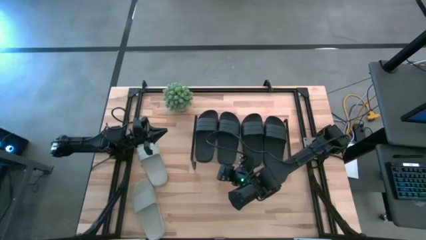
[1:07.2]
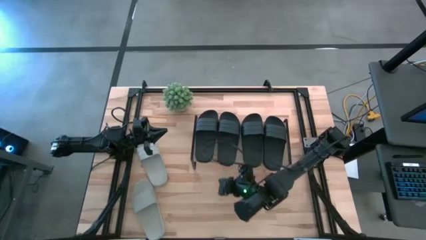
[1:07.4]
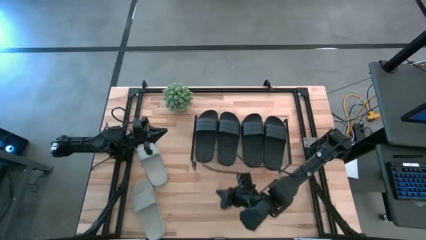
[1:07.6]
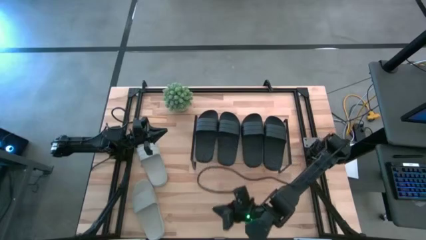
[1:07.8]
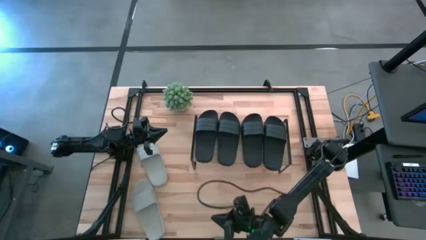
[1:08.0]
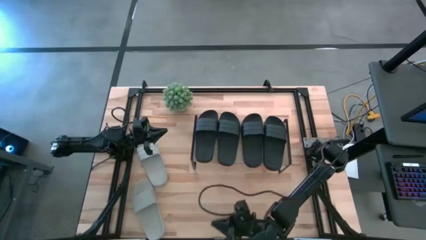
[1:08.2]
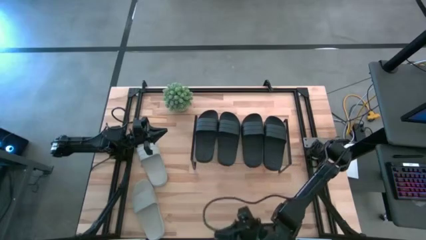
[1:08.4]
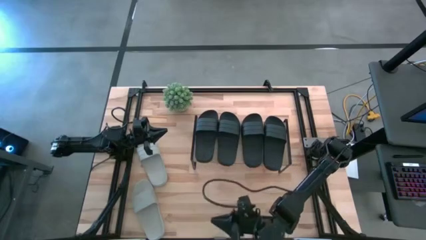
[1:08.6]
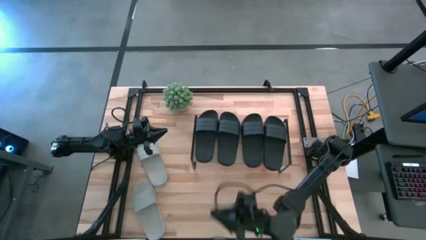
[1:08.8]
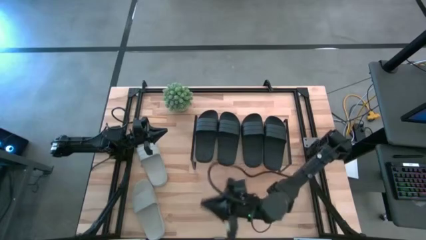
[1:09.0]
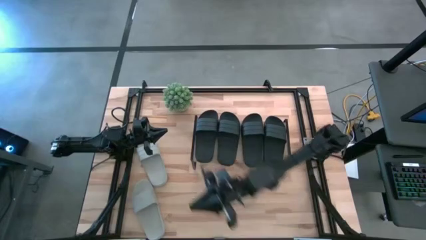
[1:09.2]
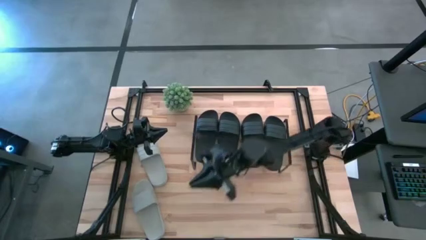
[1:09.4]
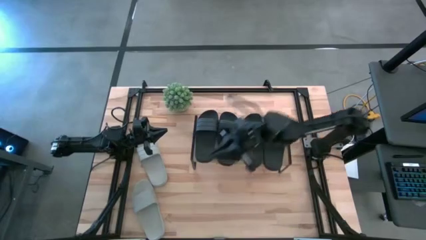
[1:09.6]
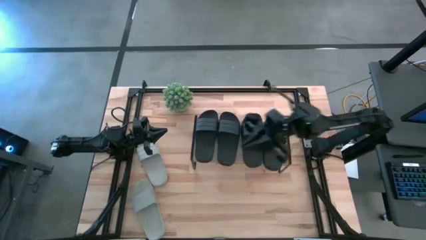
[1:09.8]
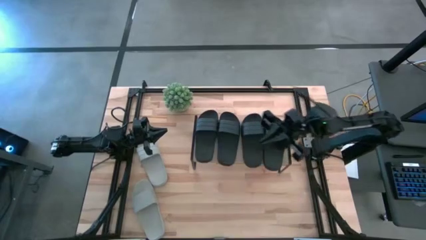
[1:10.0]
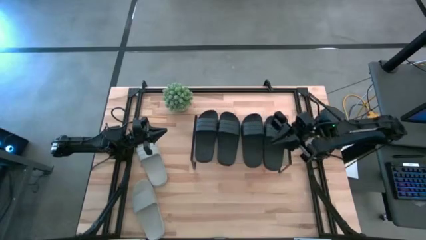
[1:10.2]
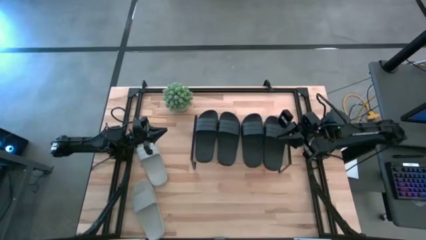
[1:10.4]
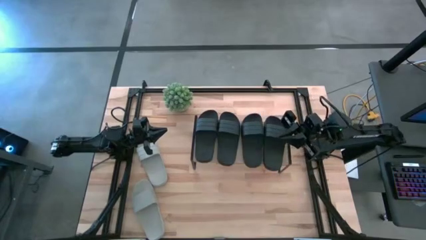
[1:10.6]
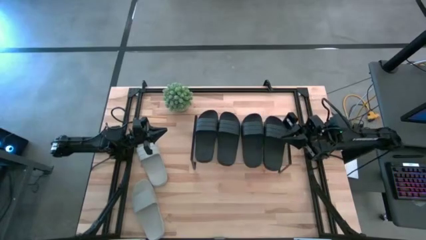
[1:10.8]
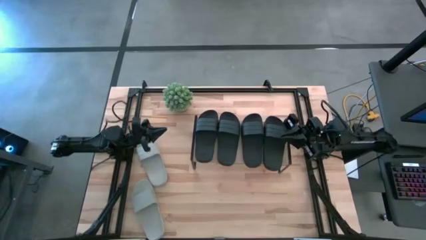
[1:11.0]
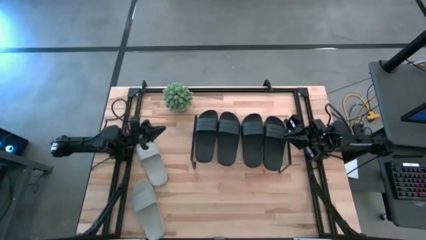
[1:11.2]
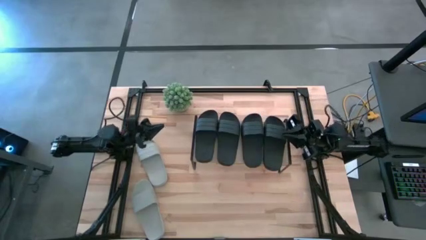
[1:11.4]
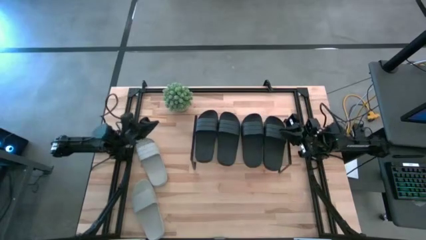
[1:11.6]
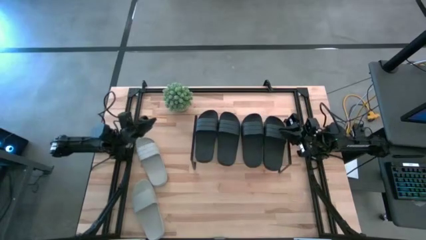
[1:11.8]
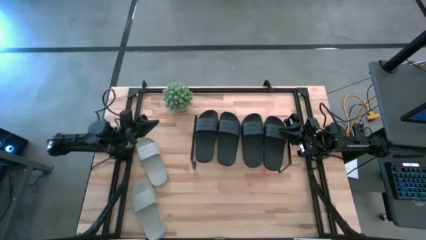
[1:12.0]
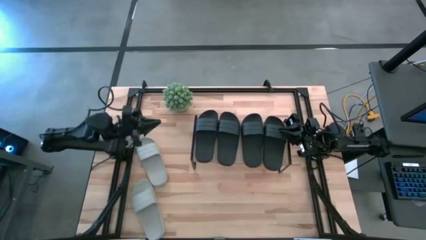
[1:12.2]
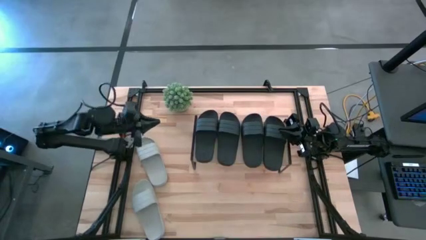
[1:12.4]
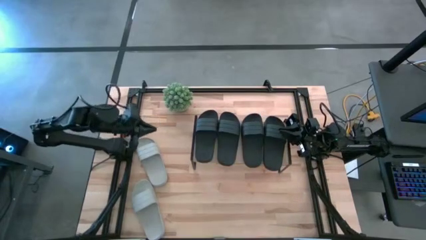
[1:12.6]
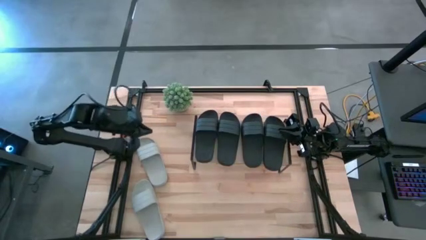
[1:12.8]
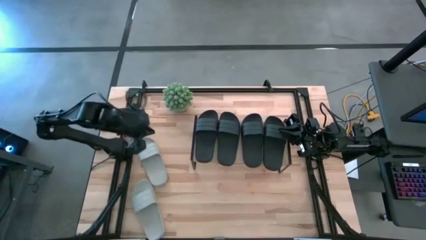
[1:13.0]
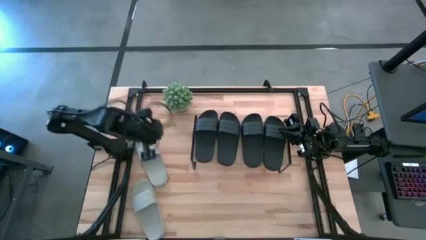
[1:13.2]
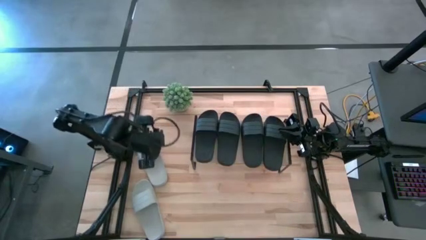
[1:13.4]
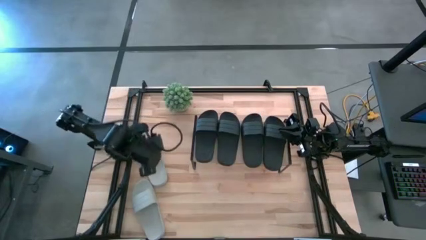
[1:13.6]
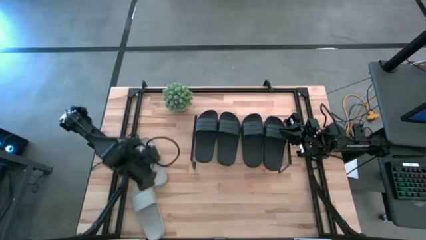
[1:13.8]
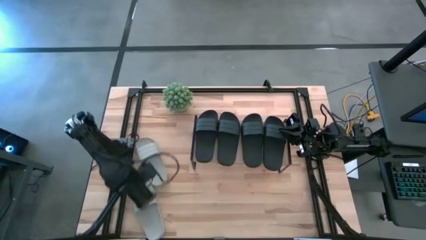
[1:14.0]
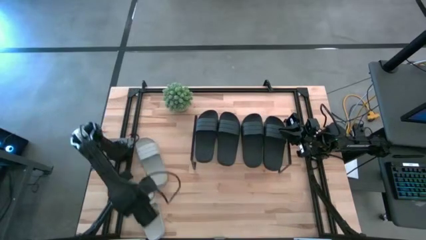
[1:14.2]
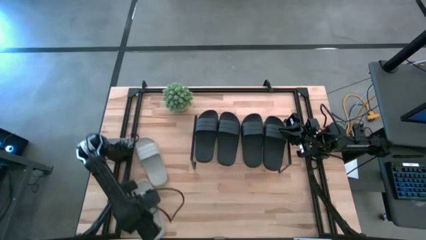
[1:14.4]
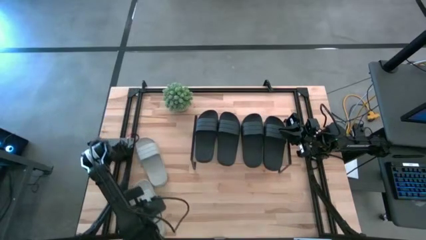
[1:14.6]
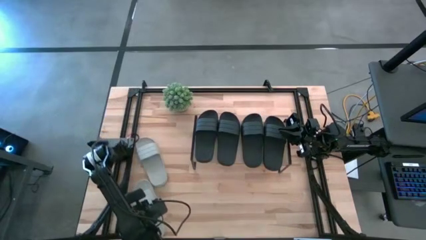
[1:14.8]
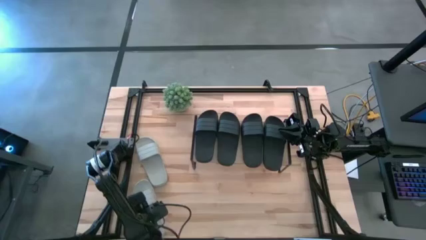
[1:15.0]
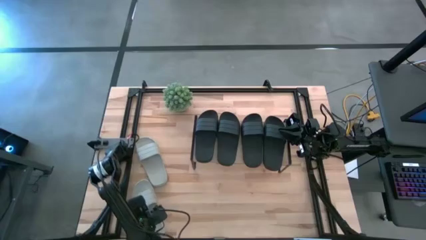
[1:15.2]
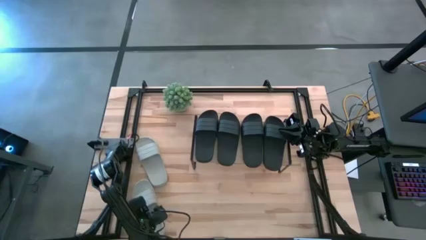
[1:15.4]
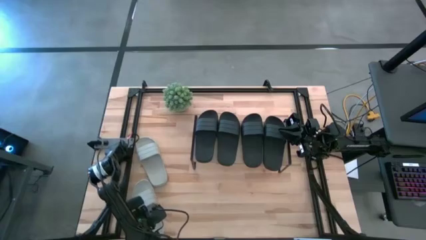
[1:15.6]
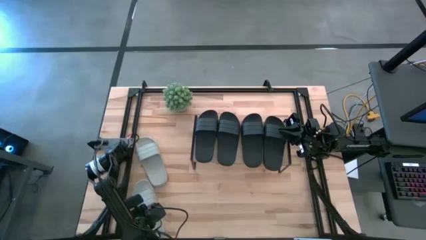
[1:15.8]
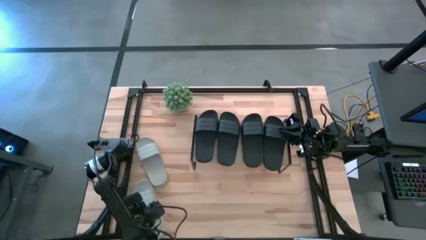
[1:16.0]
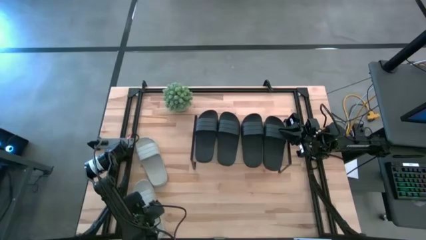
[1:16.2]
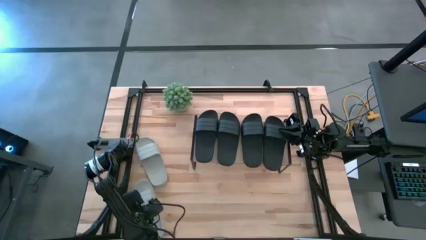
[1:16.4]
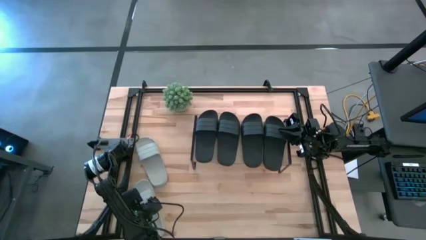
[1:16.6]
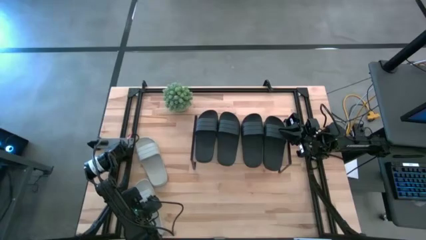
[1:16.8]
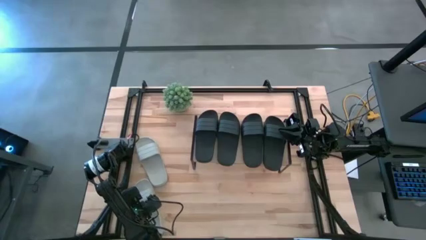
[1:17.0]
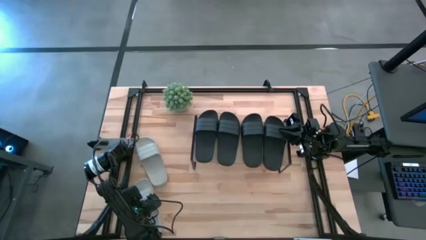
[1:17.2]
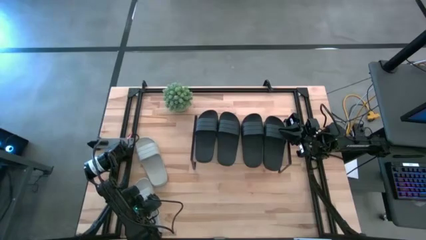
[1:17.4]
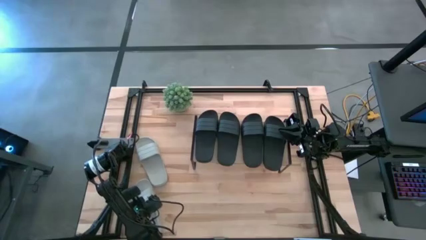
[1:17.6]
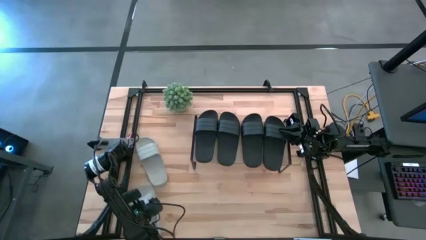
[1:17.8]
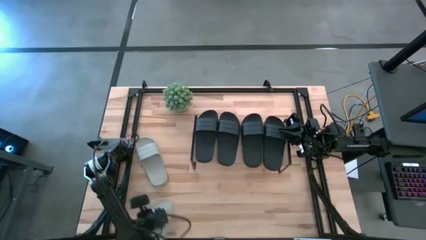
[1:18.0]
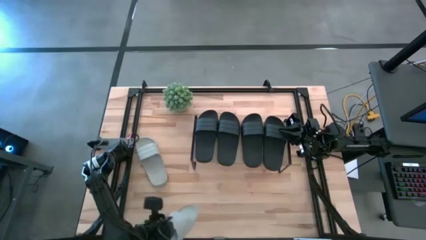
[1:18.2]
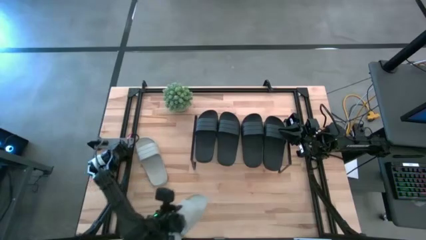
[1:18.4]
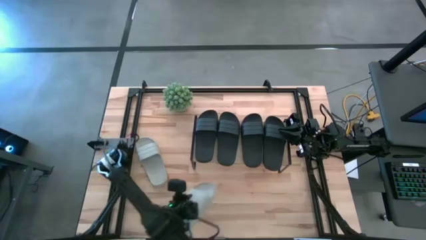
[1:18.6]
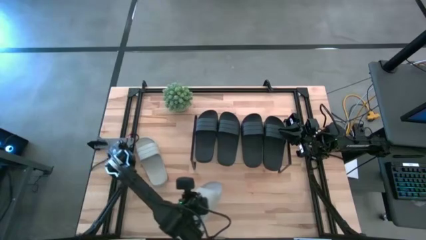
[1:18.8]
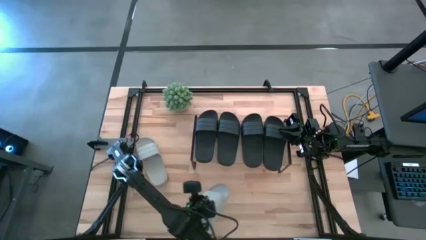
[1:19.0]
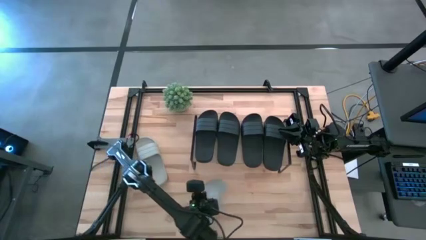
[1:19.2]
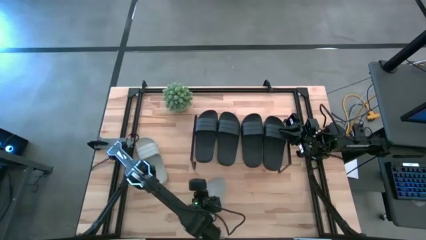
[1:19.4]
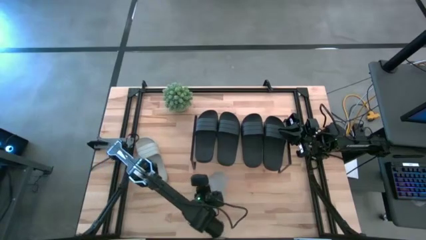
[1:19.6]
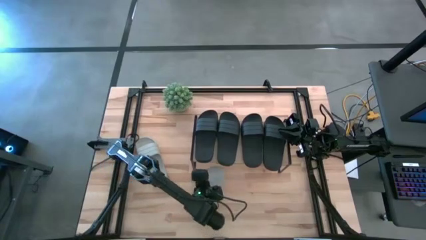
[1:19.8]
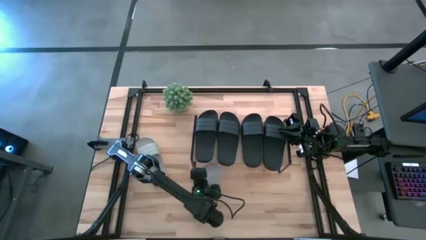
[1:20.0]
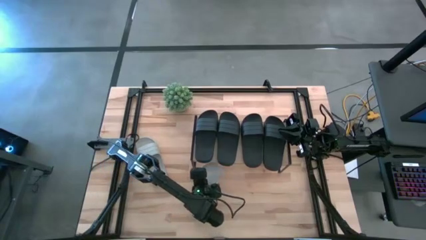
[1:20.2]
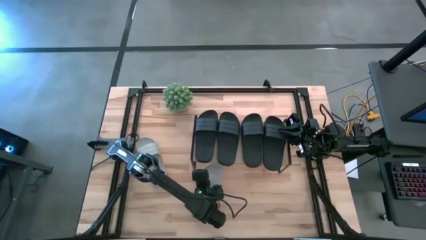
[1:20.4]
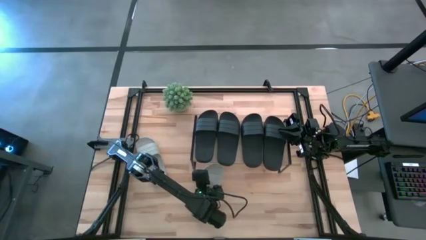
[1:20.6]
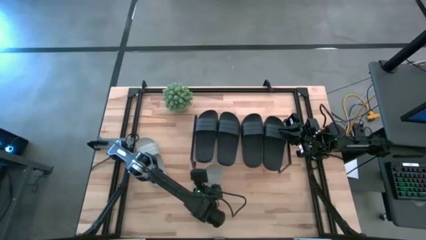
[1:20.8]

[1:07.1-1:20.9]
Task: Pick and place slides into the shelf
Move the gray slipper to the bottom center of the table
